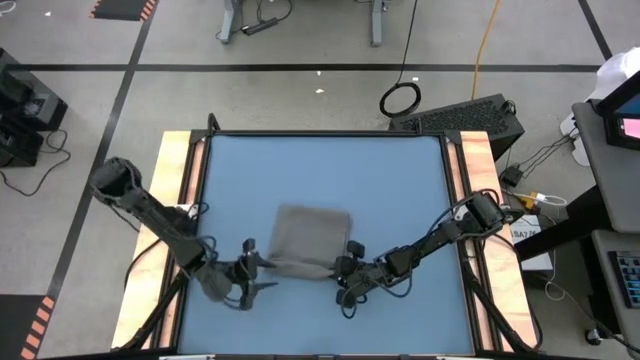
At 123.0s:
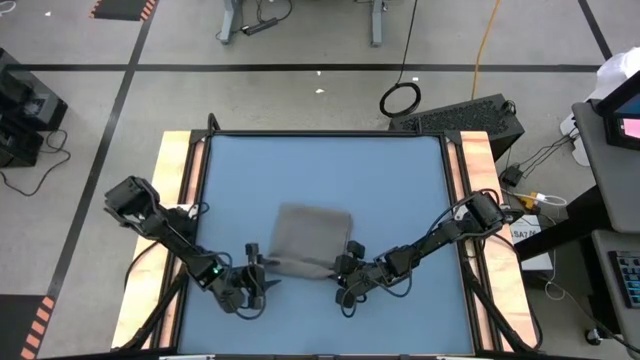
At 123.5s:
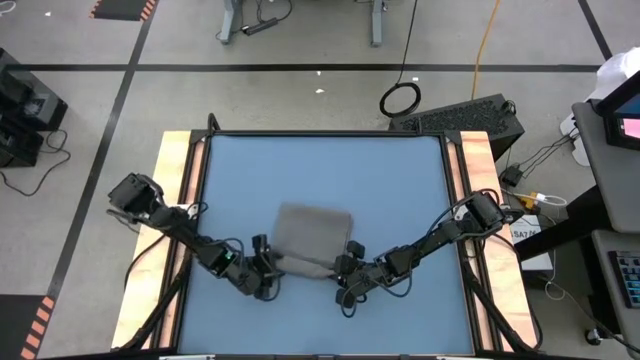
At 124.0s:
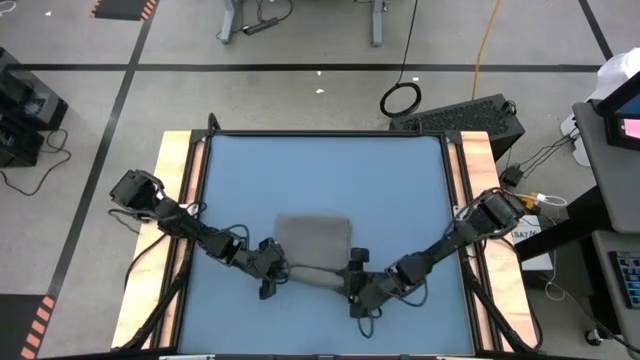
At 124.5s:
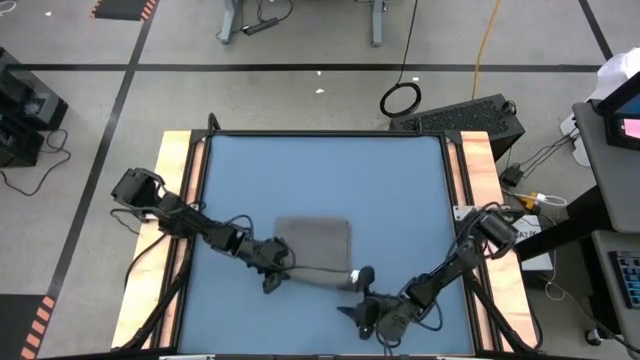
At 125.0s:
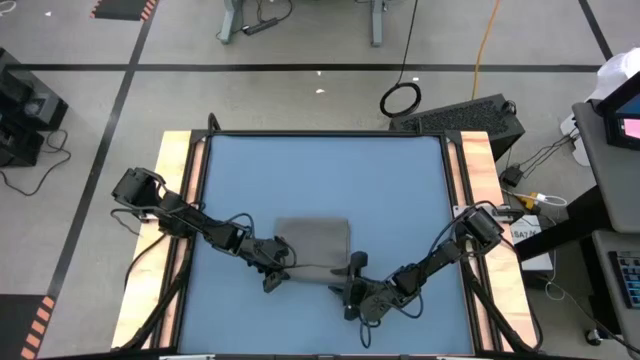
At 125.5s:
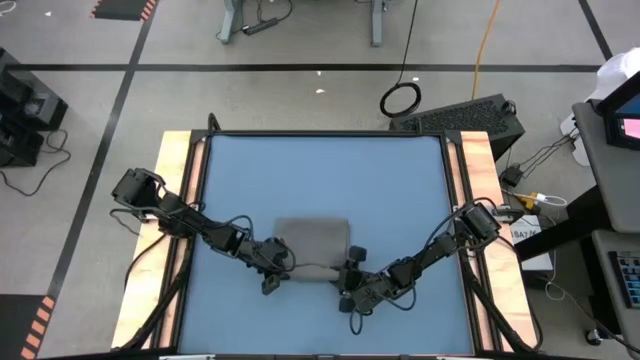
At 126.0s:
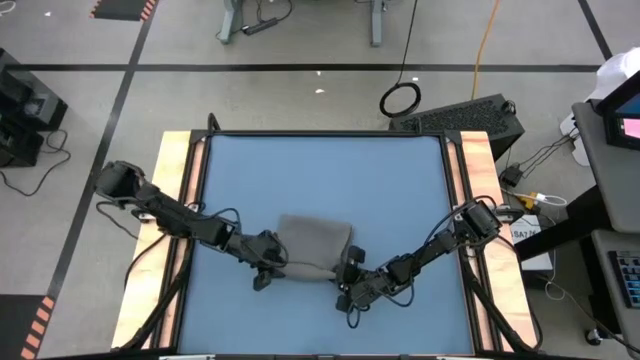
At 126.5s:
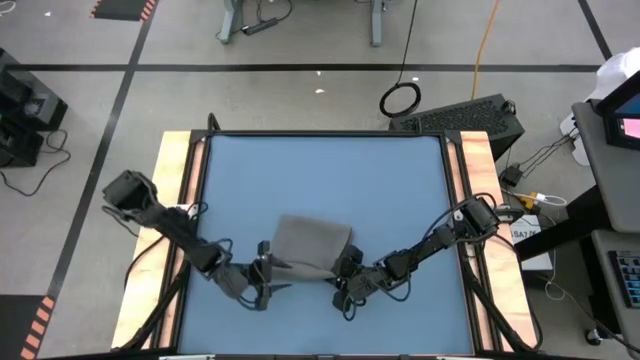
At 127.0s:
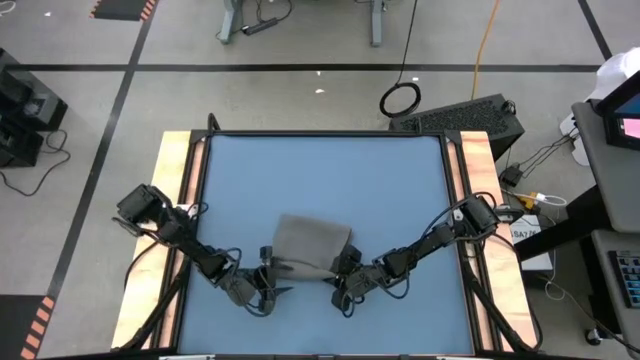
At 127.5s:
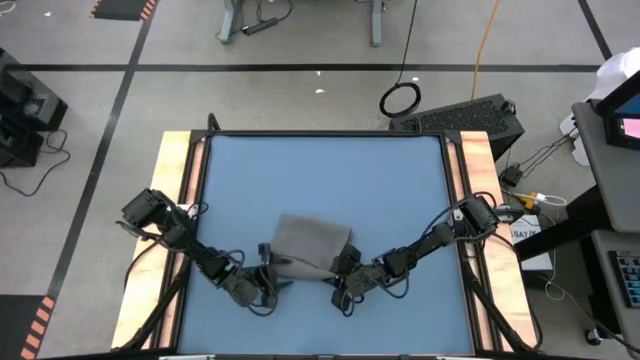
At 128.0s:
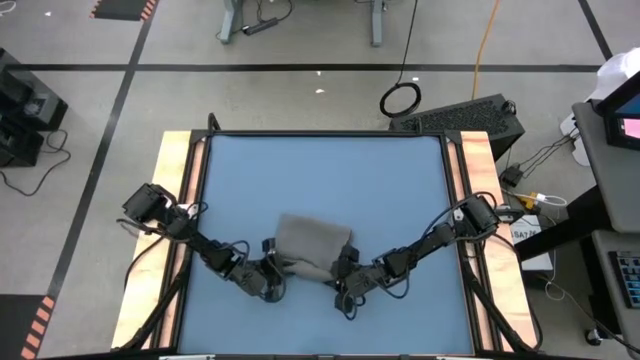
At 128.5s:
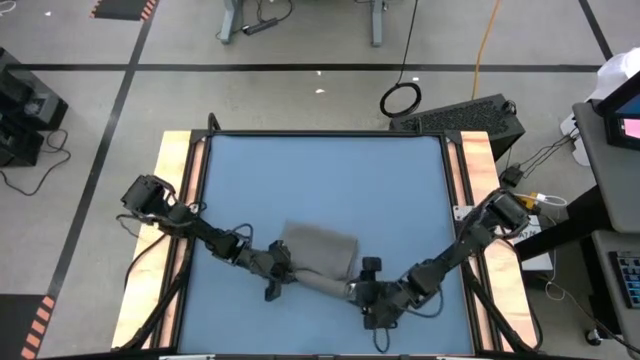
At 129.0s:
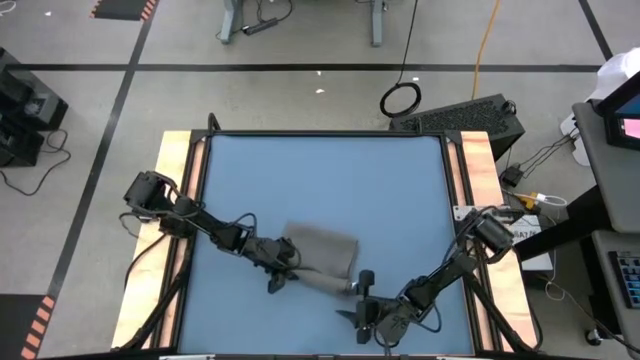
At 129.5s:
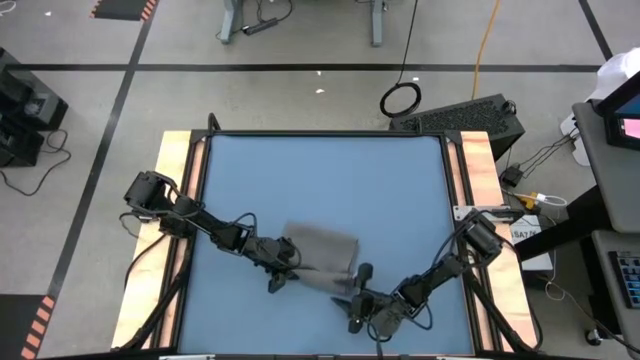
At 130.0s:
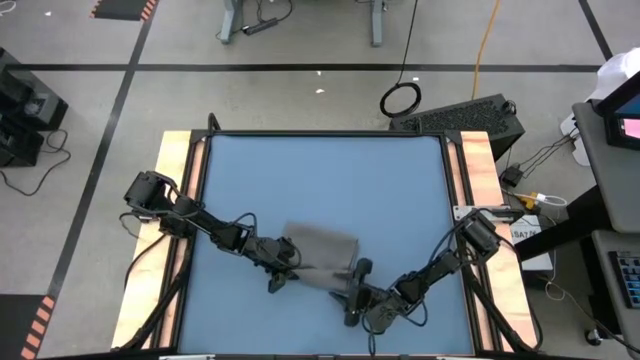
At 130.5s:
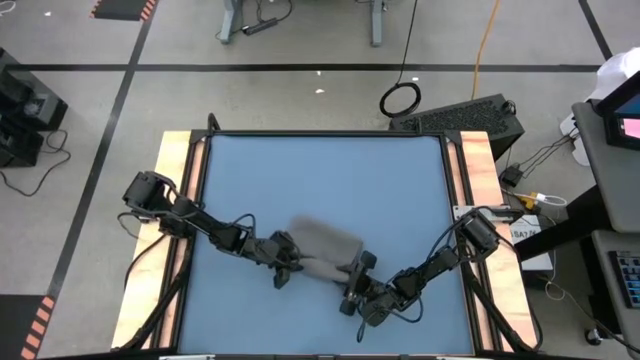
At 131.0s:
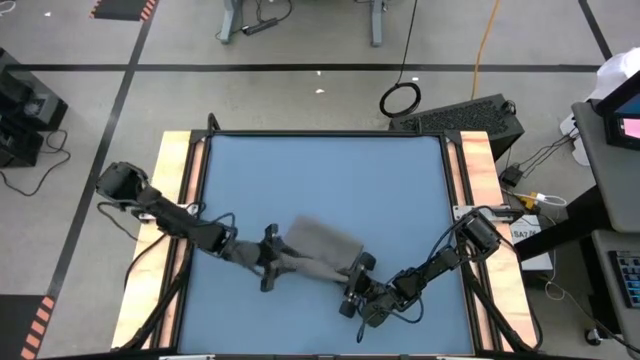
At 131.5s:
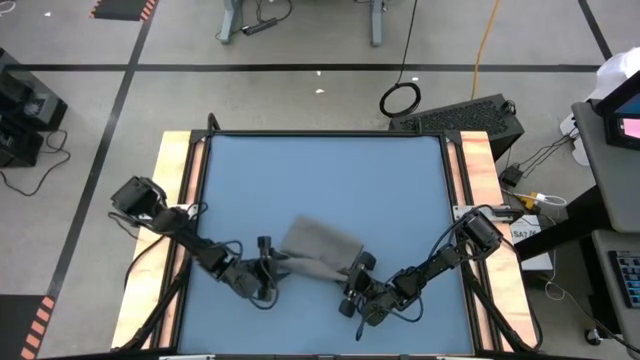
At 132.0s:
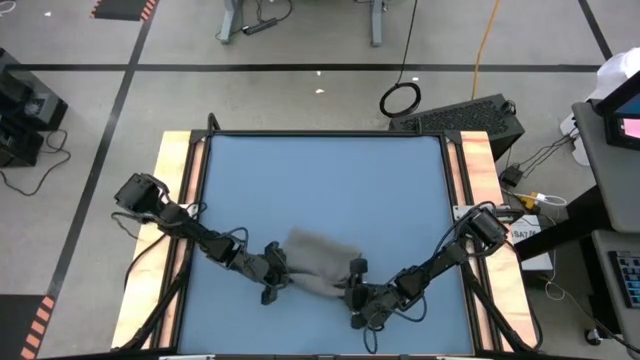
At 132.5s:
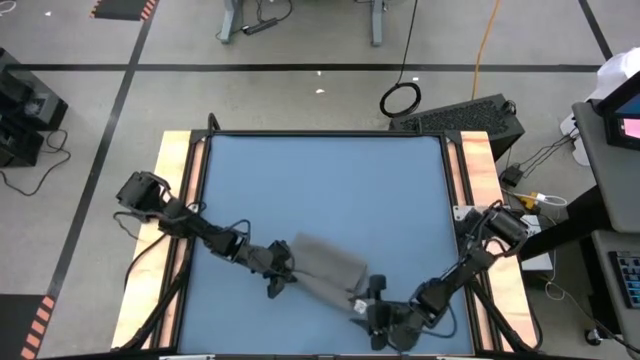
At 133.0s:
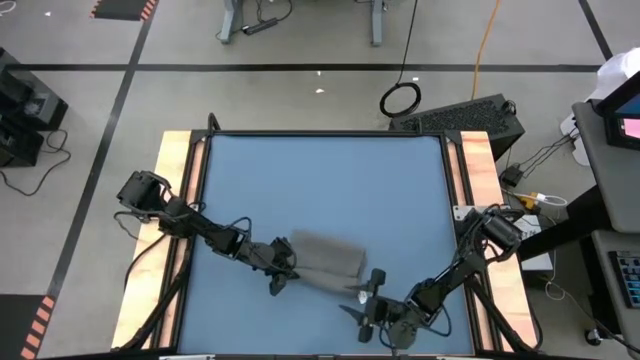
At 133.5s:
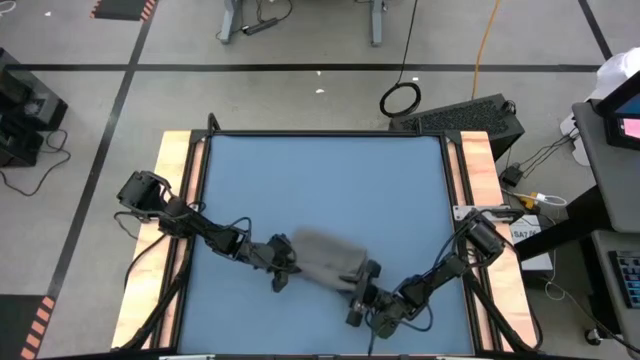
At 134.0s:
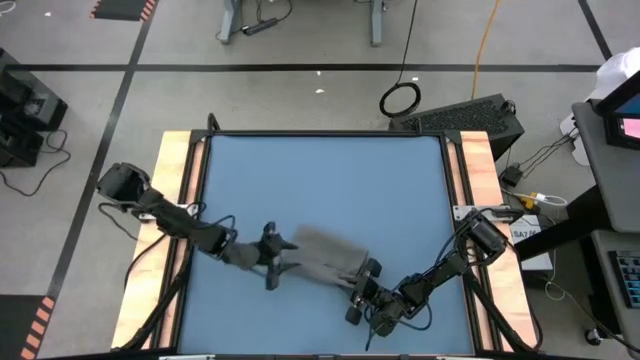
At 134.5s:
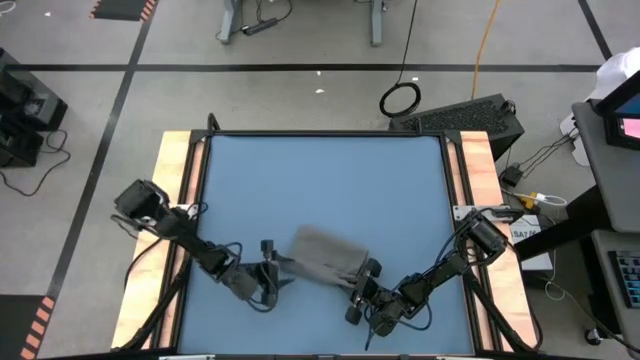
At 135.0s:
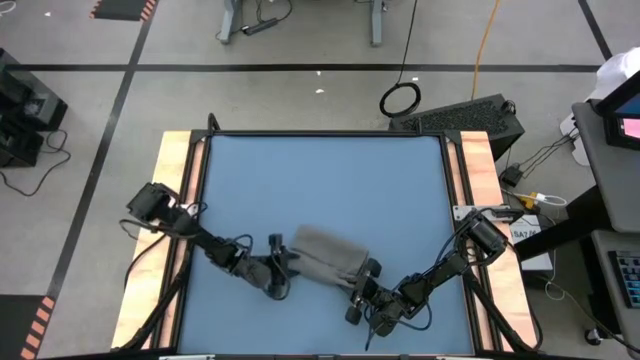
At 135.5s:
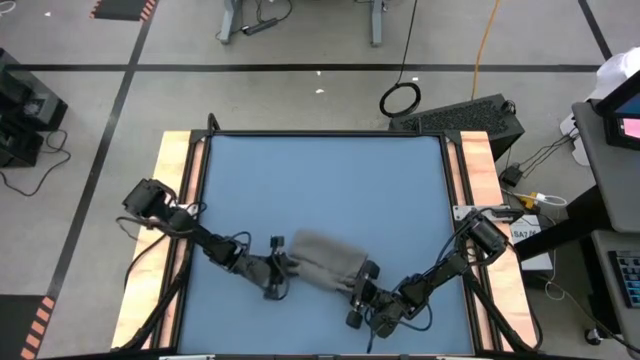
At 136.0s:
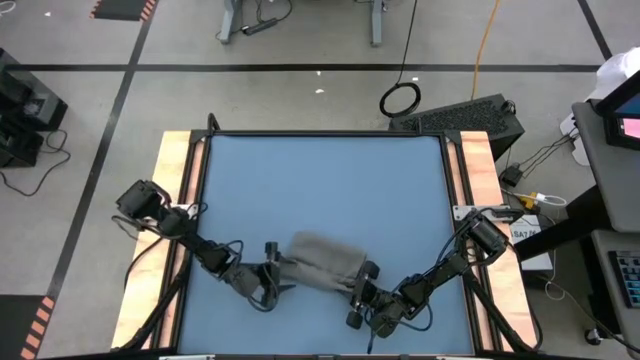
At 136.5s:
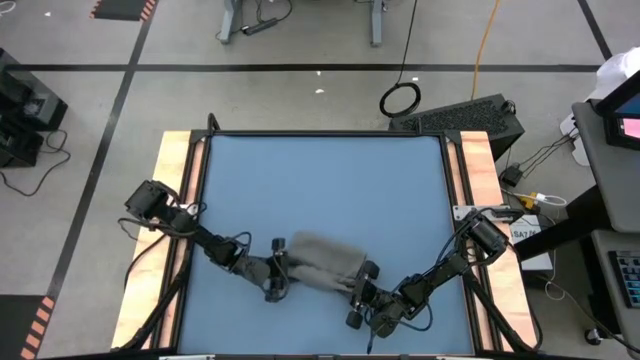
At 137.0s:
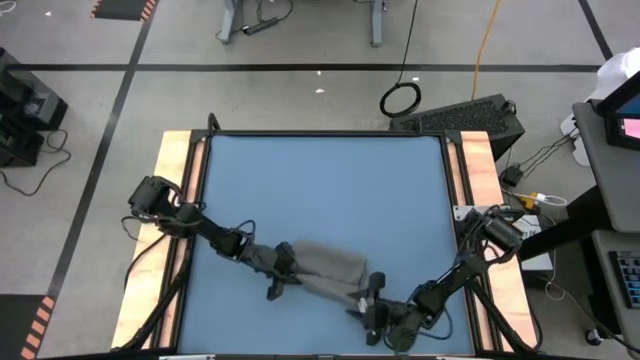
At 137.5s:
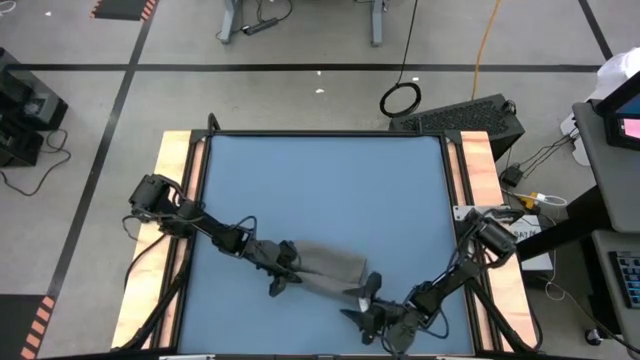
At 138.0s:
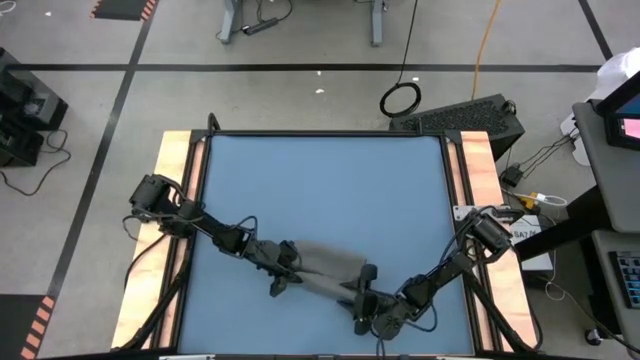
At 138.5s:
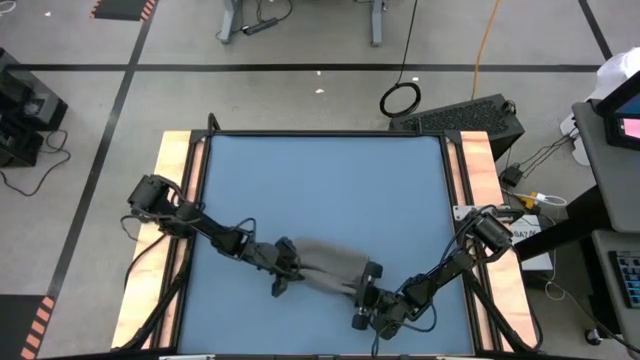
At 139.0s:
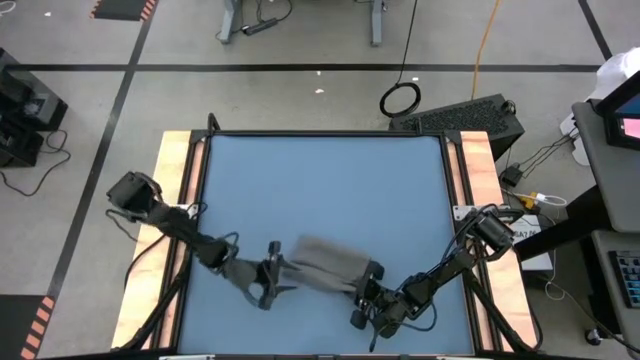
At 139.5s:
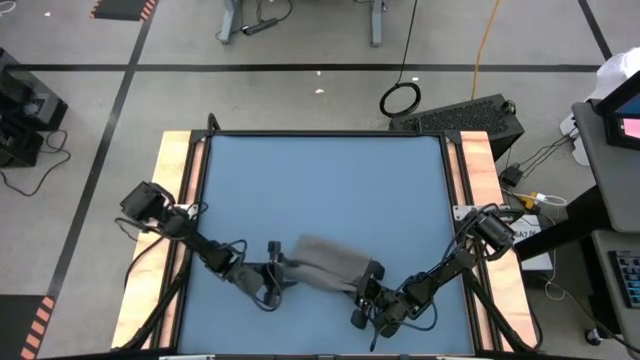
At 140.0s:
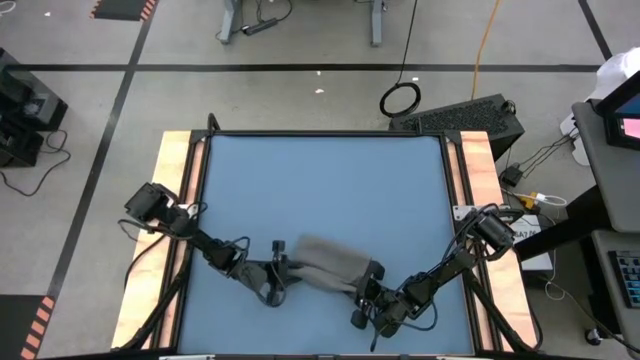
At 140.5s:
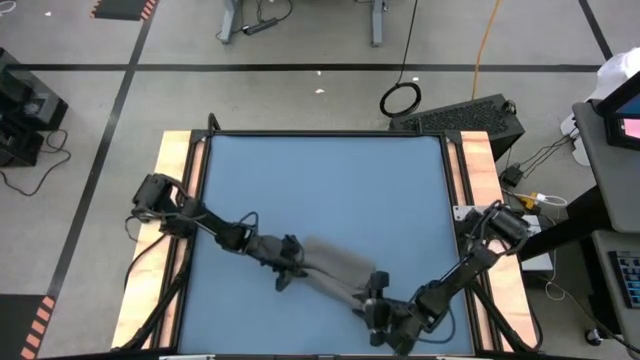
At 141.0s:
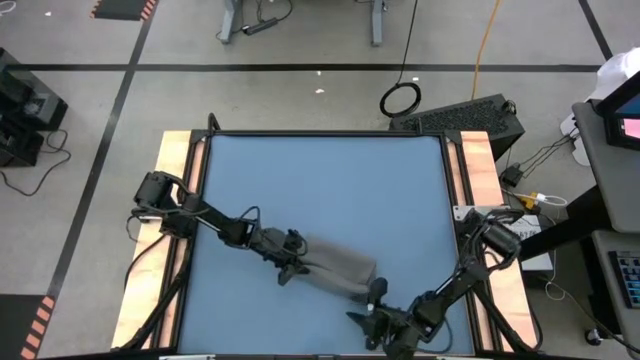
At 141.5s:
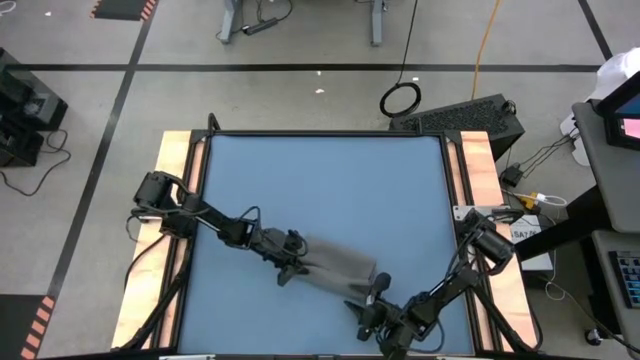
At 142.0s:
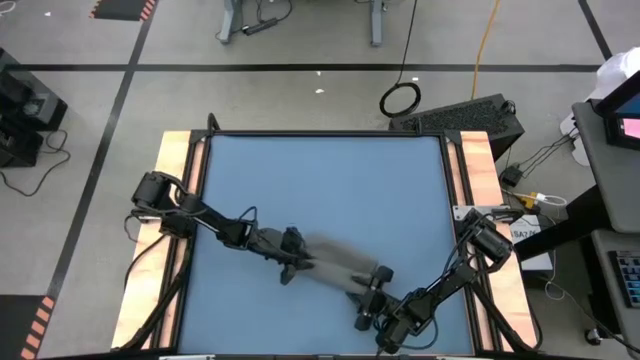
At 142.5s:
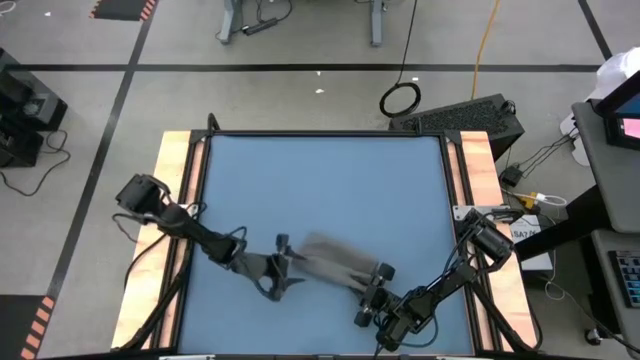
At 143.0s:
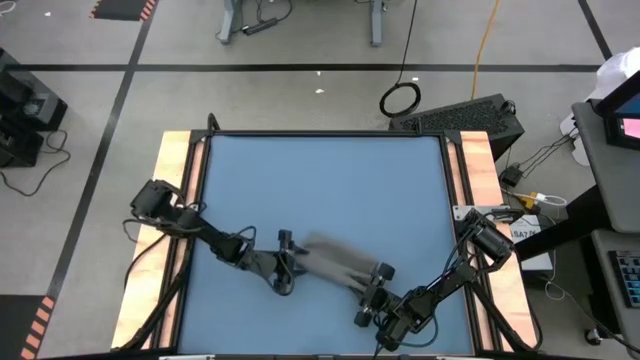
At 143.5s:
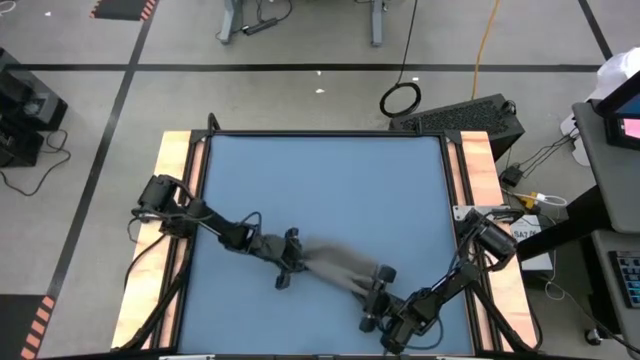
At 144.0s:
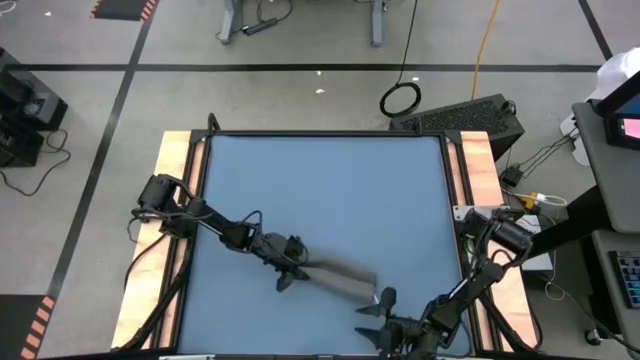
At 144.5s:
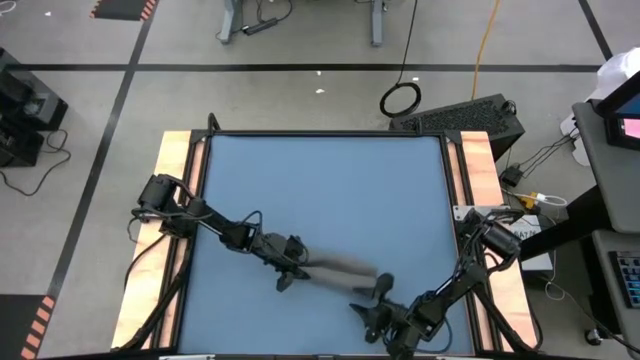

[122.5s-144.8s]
Task: Roll towel
Roll the gray towel
